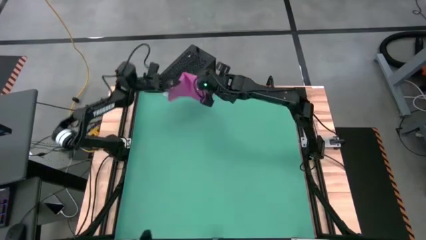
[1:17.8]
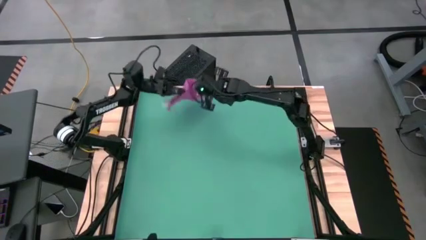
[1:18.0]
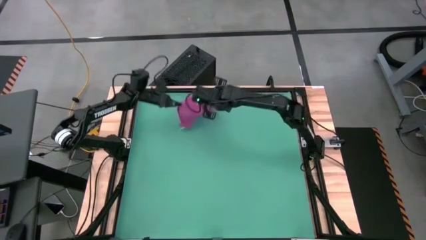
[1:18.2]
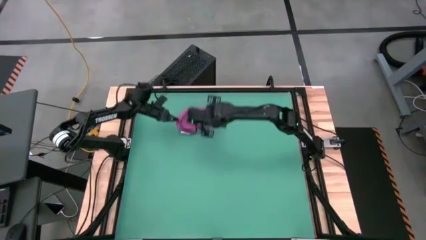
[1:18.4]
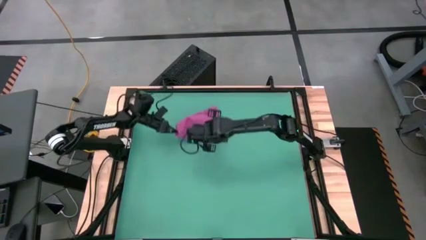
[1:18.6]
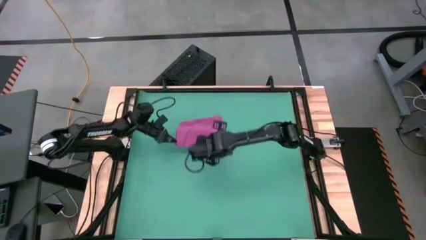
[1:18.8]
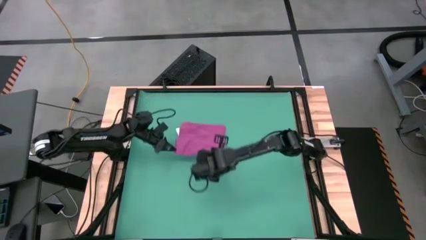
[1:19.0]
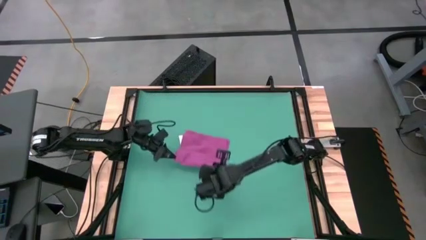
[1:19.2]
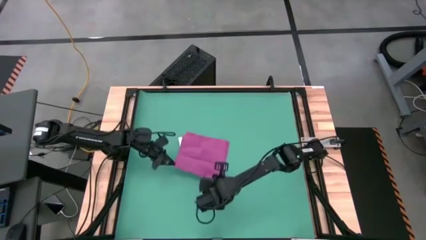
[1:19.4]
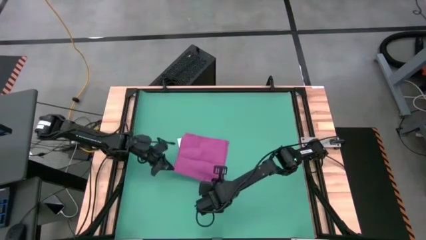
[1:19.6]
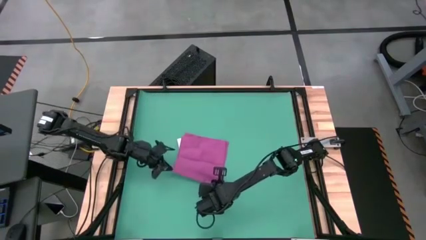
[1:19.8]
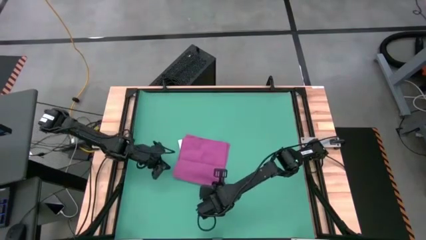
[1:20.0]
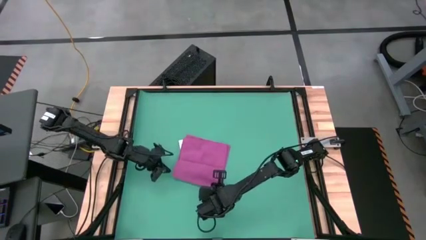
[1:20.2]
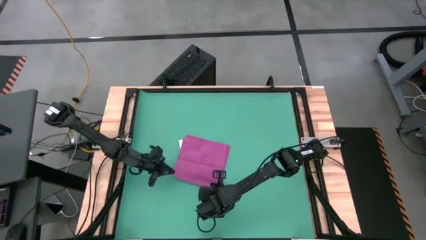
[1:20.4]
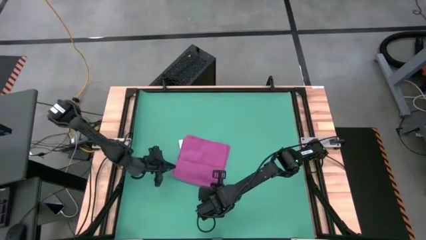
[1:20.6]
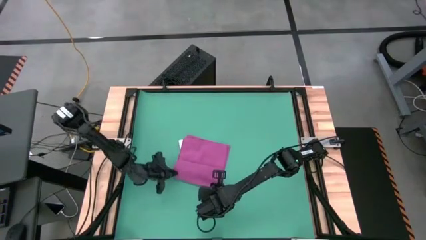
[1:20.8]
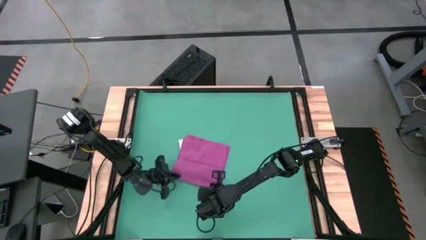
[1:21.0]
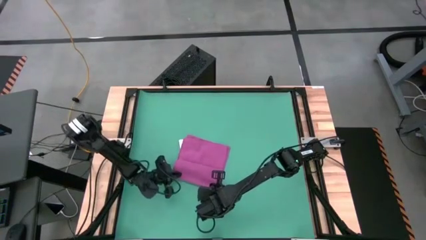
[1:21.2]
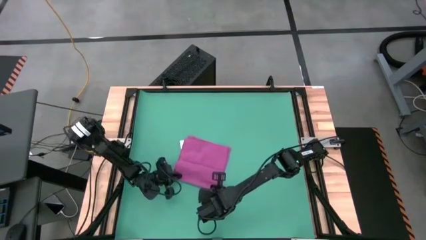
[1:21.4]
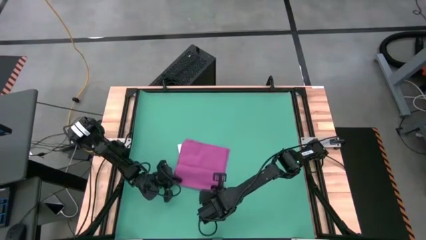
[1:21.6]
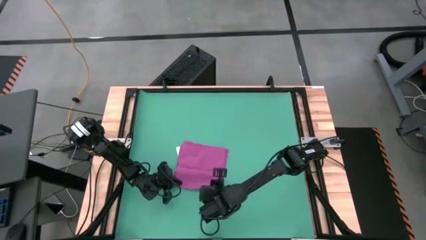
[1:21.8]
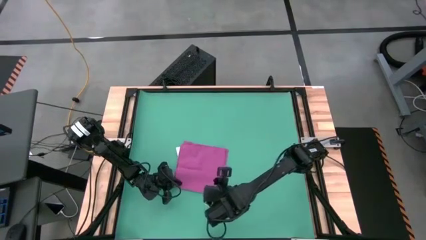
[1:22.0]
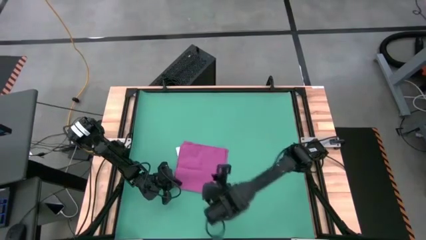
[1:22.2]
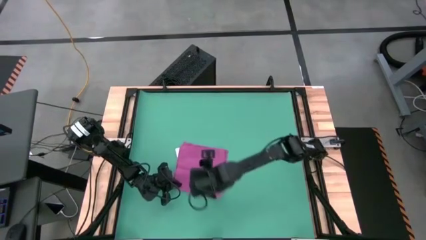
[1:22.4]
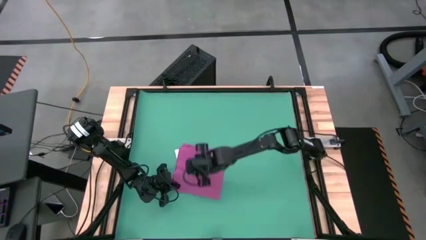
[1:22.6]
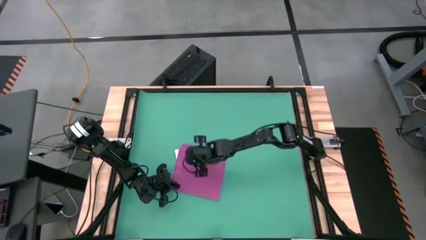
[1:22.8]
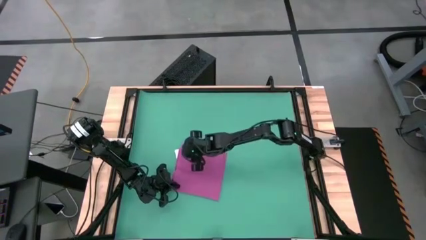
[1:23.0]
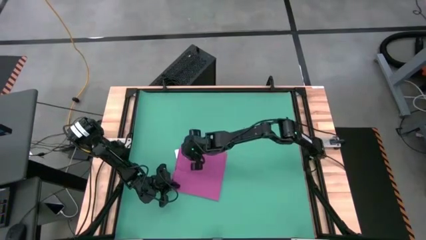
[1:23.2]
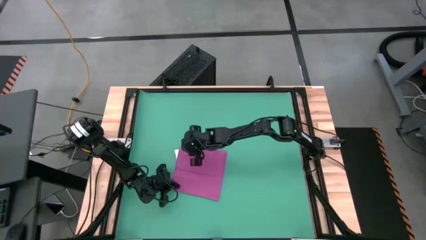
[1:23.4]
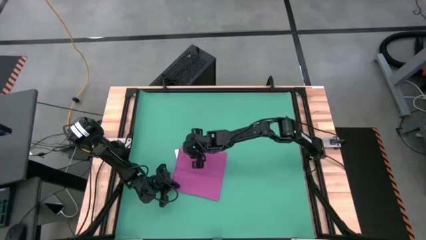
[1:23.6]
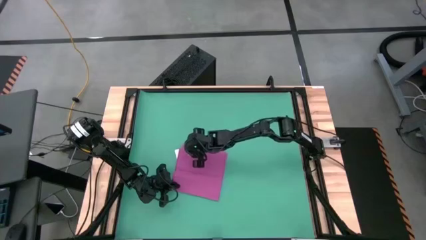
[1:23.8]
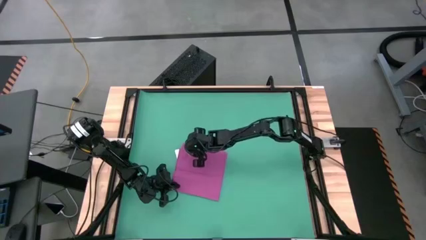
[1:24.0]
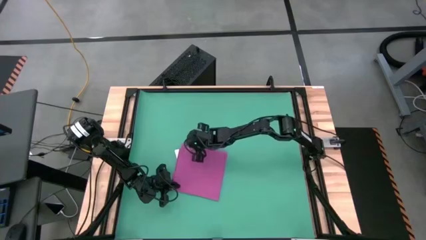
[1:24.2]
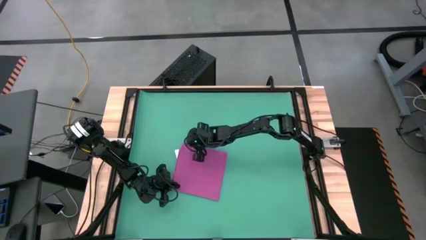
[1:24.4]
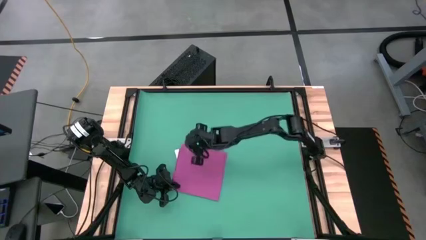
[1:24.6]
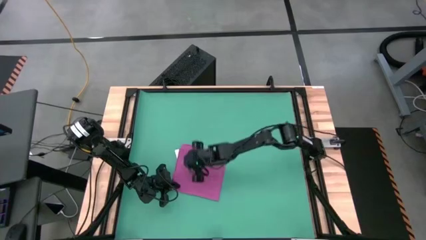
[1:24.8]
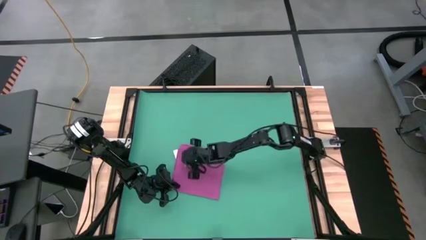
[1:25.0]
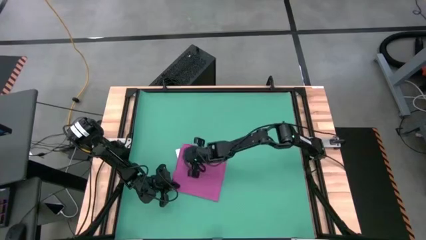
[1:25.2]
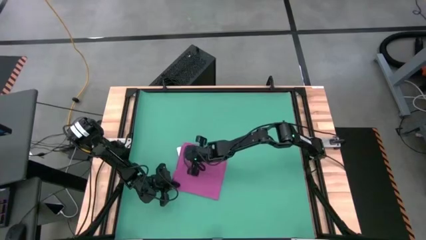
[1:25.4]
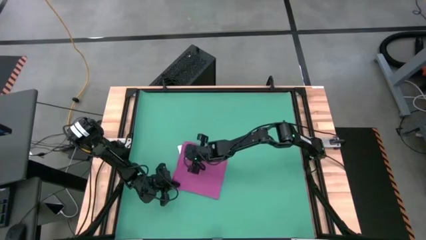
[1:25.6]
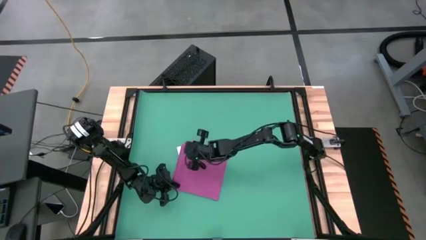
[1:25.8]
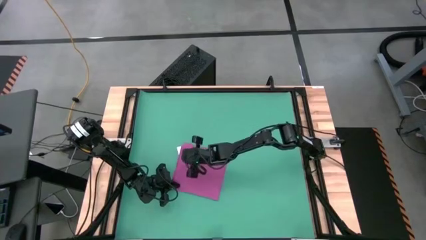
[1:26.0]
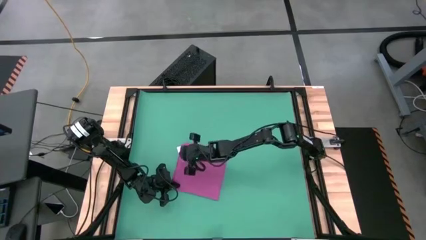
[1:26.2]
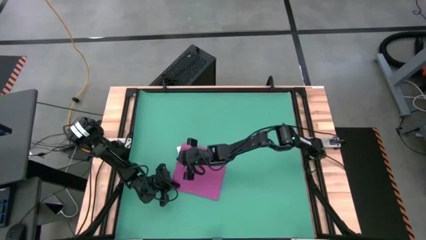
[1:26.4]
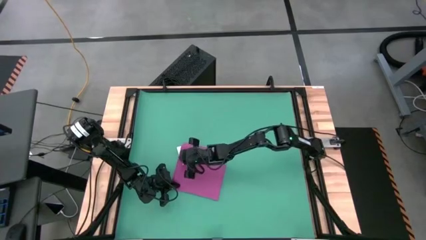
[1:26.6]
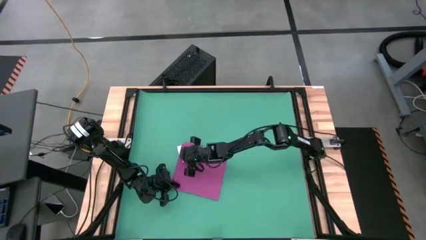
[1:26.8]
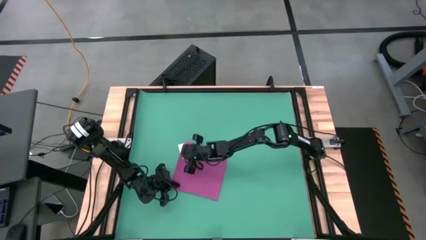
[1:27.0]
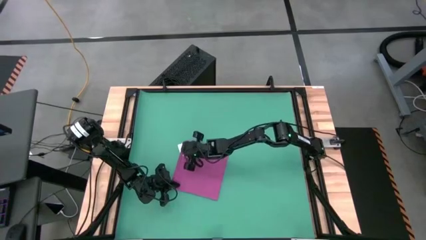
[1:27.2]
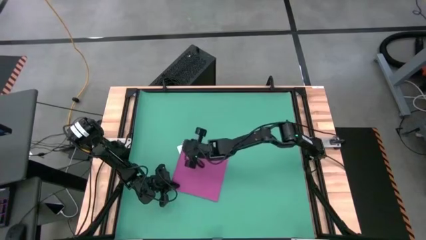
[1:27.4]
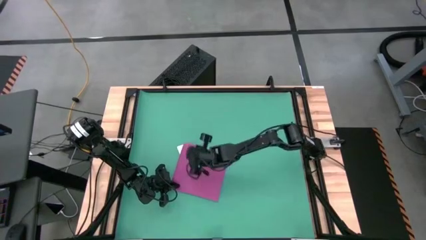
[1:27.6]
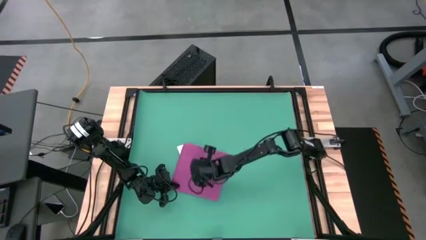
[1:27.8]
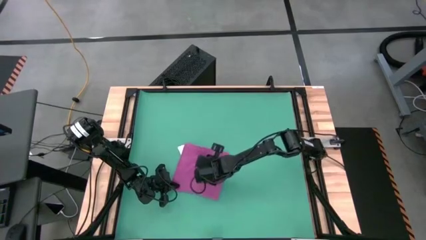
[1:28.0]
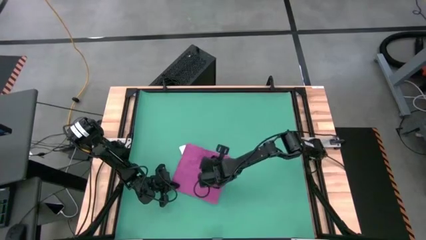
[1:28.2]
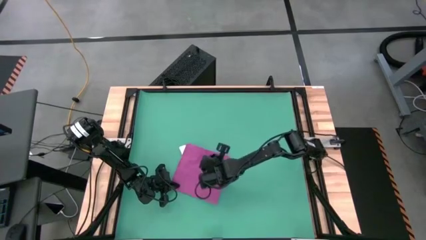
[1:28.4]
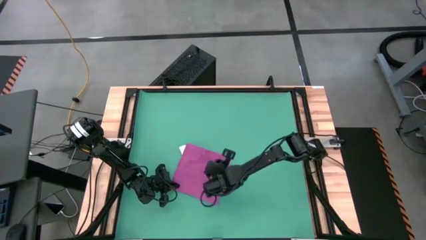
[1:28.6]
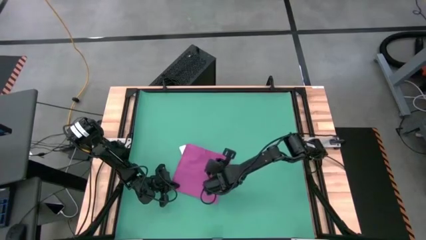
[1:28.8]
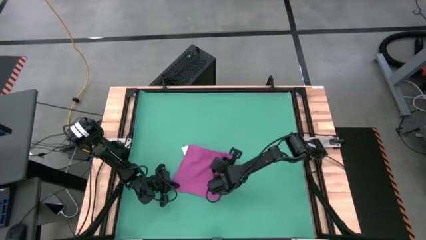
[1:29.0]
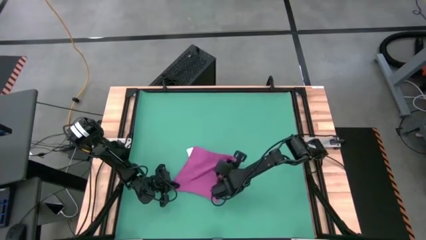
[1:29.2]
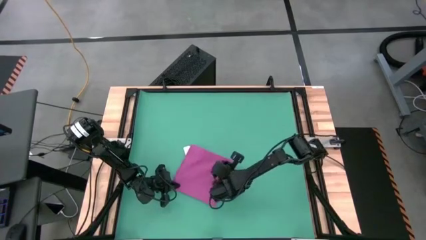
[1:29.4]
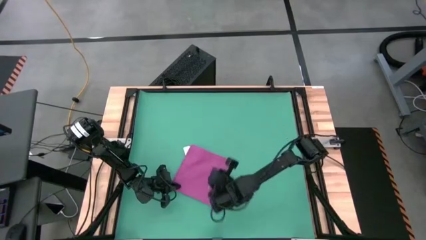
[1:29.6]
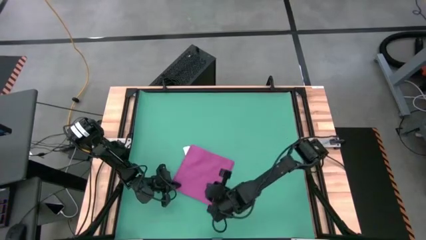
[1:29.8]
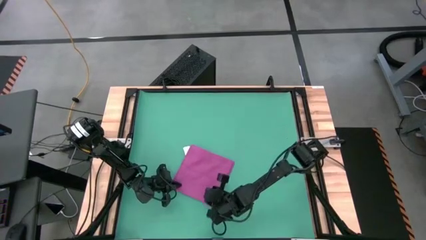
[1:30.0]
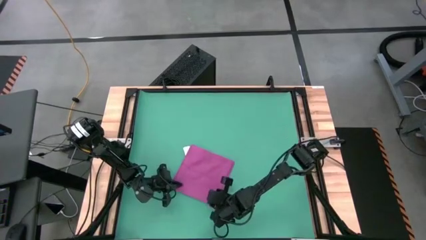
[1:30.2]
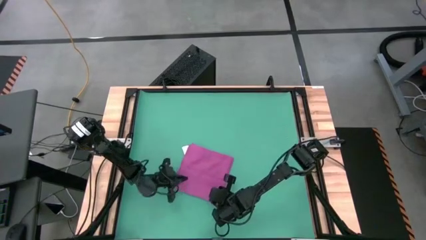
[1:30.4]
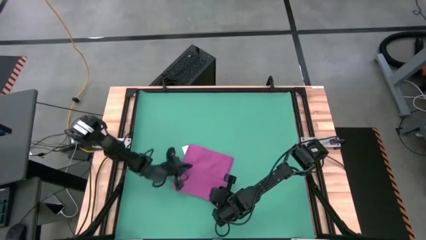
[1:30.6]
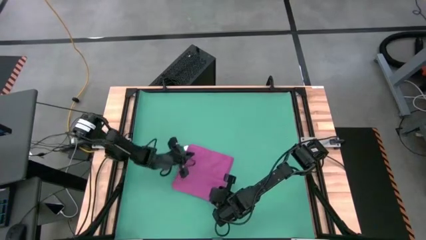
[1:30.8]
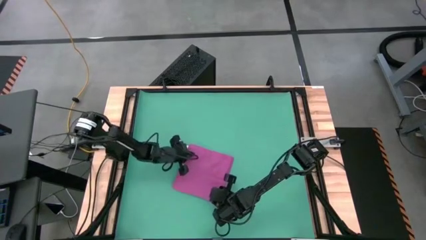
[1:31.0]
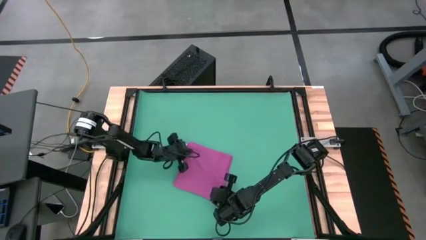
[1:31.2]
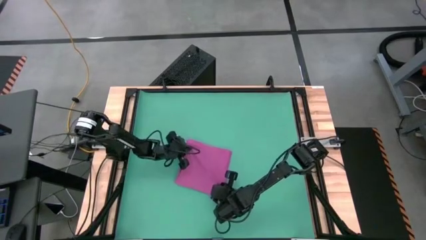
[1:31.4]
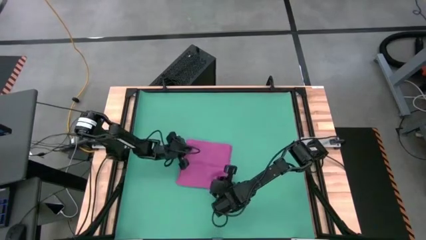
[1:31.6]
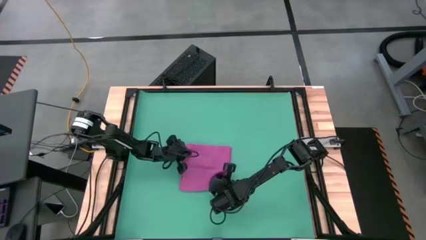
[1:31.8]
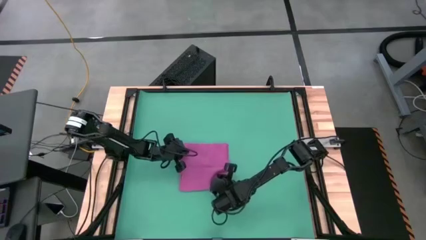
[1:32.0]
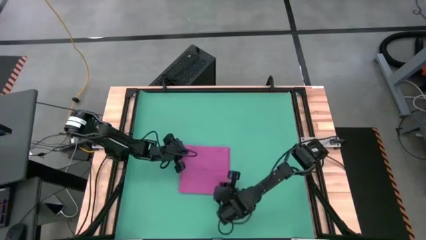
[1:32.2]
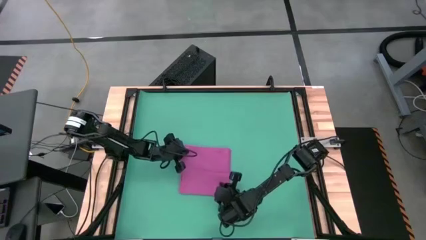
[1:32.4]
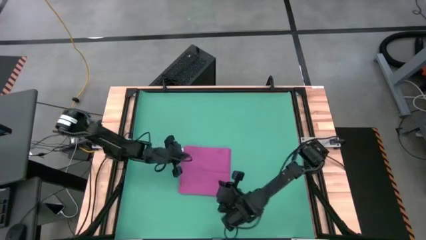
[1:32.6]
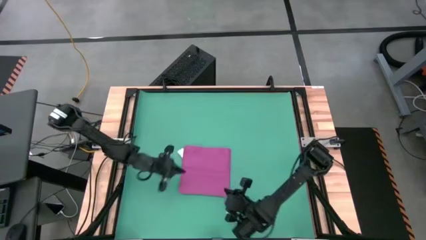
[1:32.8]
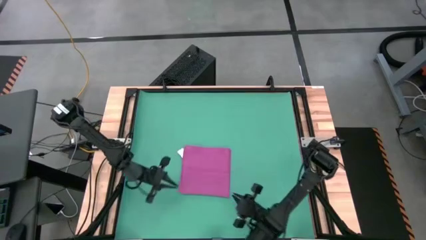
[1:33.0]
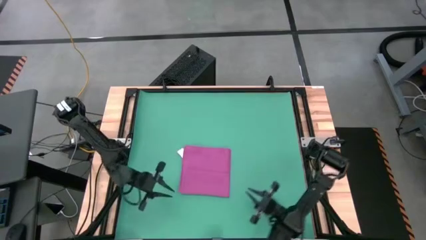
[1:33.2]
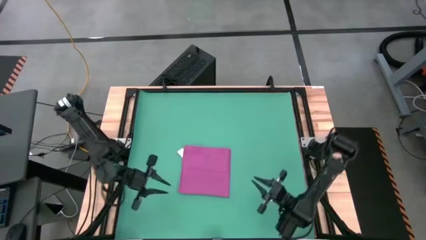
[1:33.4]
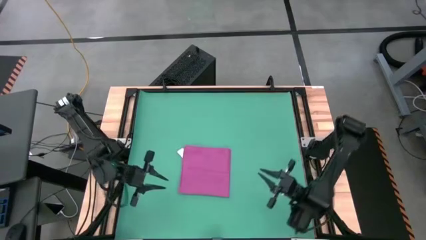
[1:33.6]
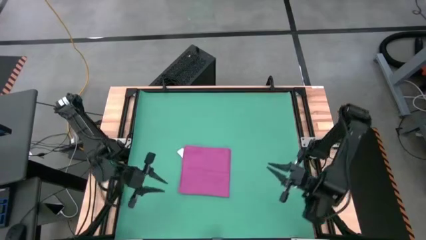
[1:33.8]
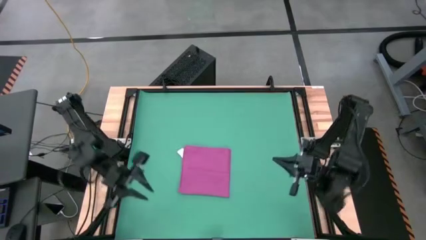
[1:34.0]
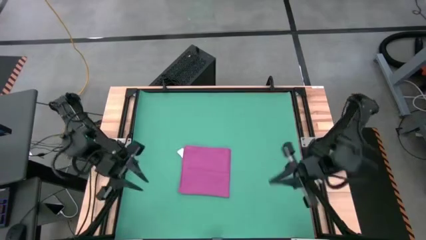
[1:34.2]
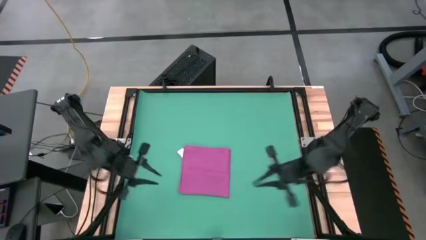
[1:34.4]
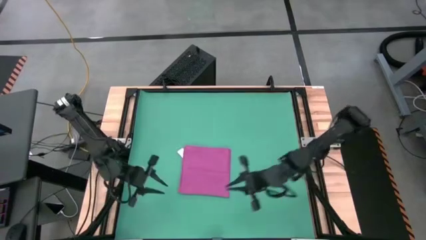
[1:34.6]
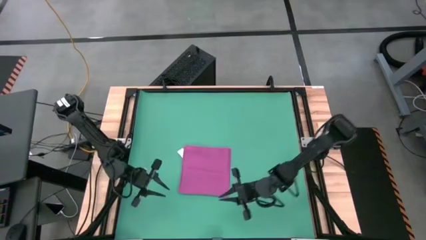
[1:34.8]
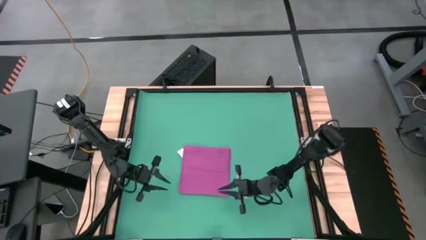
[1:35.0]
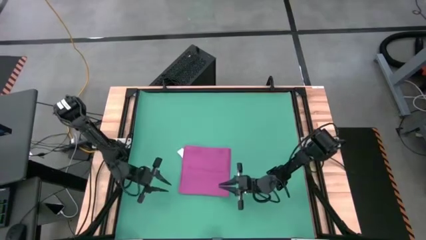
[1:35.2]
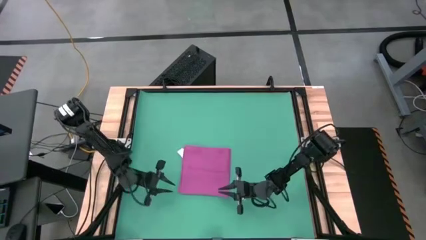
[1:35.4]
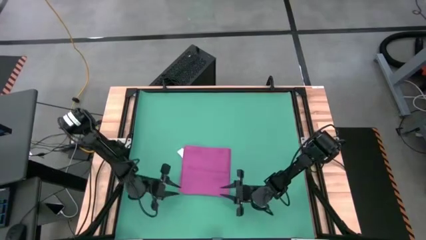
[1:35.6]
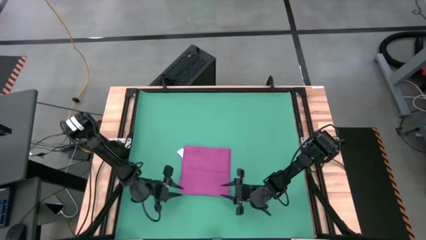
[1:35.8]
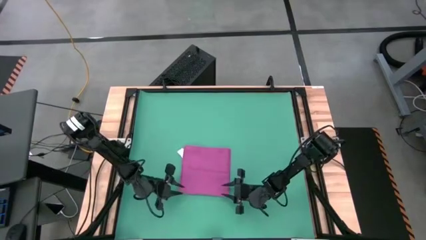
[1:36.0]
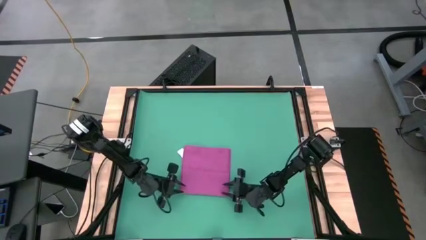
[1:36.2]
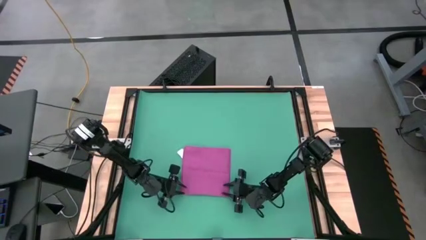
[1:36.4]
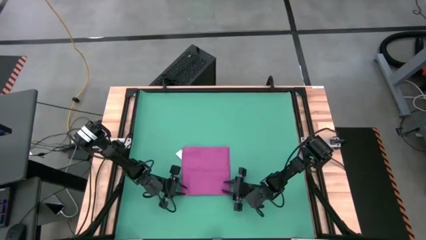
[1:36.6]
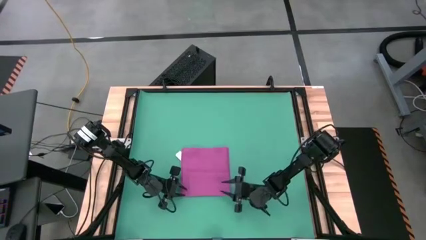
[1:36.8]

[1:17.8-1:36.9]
Task: Roll towel
Fold the pink towel
